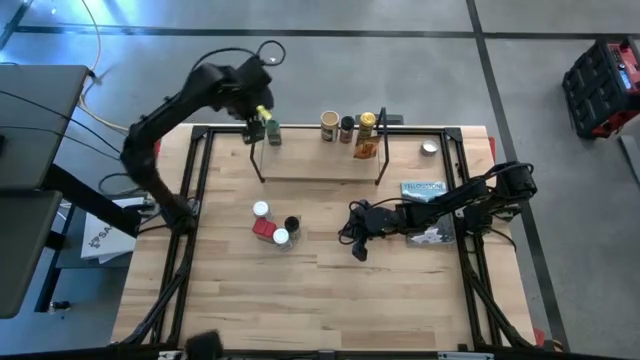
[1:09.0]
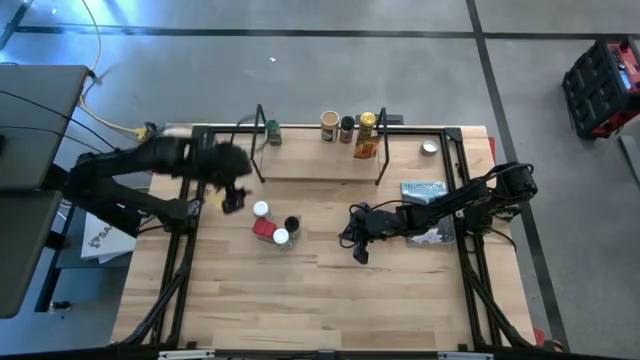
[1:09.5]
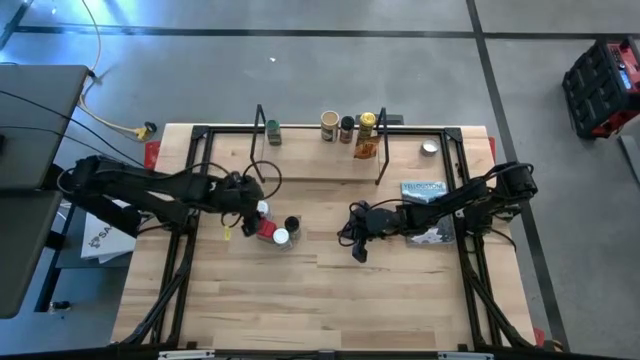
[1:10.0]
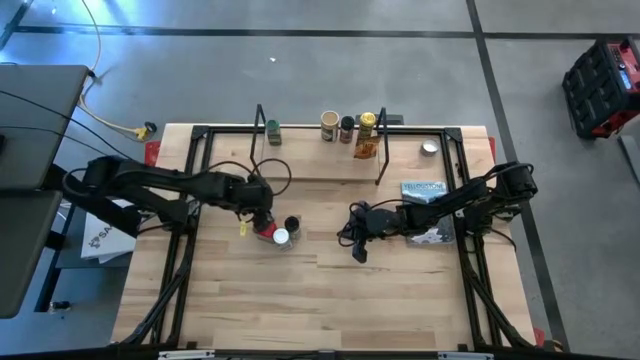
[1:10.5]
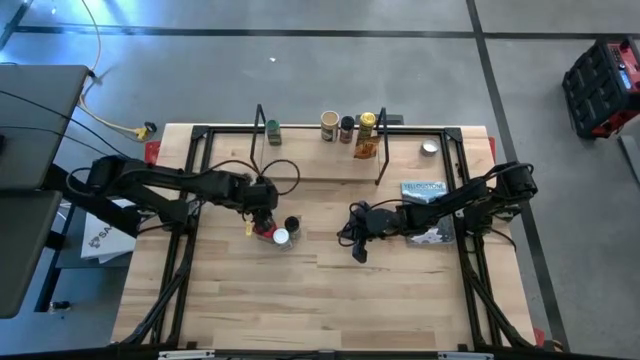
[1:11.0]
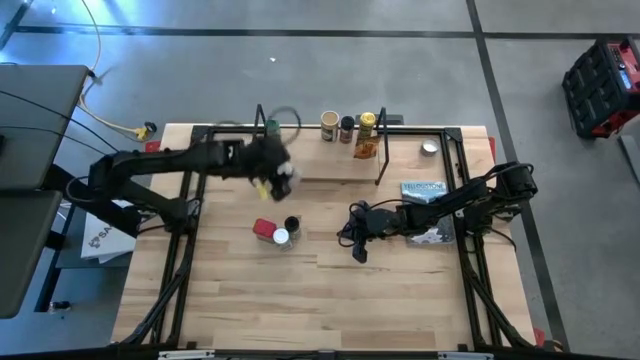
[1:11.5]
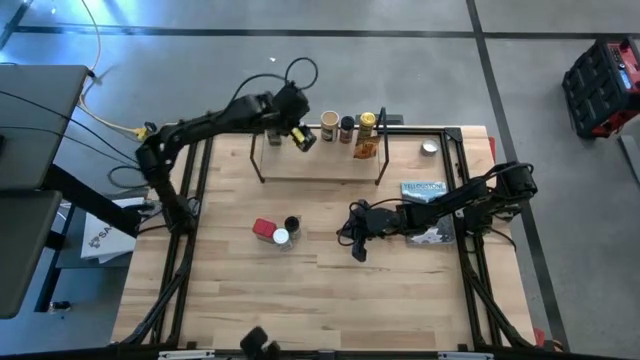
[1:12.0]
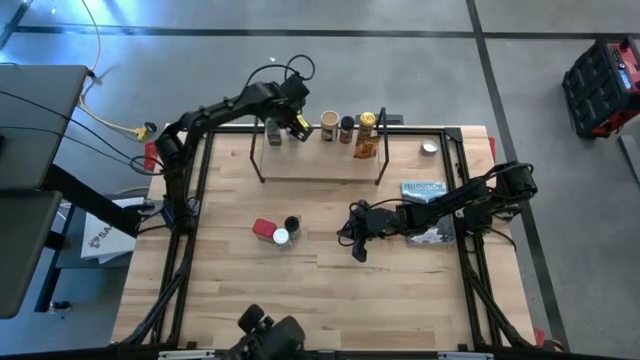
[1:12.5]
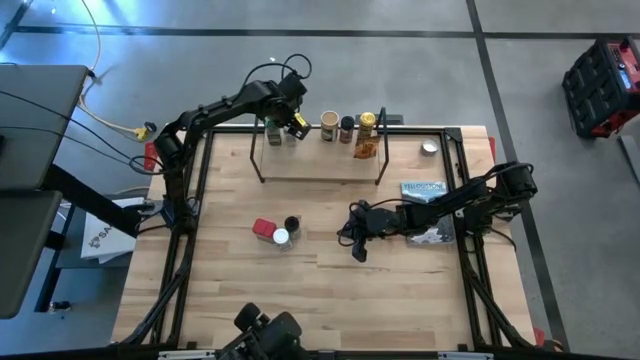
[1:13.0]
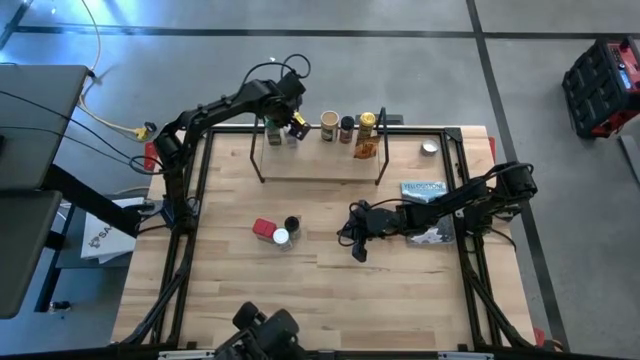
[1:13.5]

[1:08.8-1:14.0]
Task: Shelf spices
Put the top white seasoning bottle on the shelf

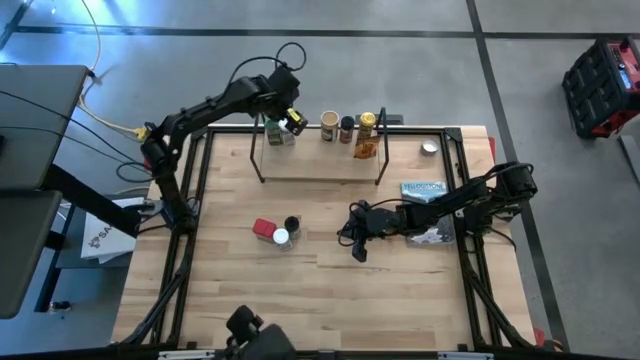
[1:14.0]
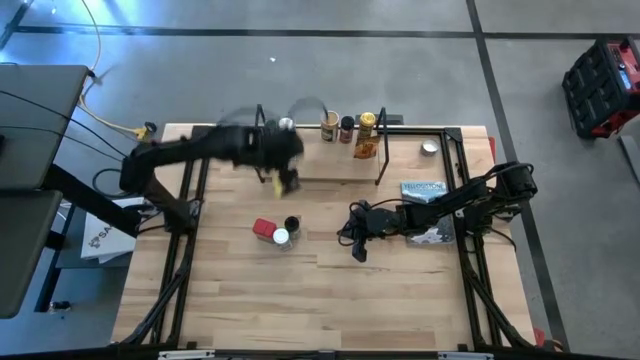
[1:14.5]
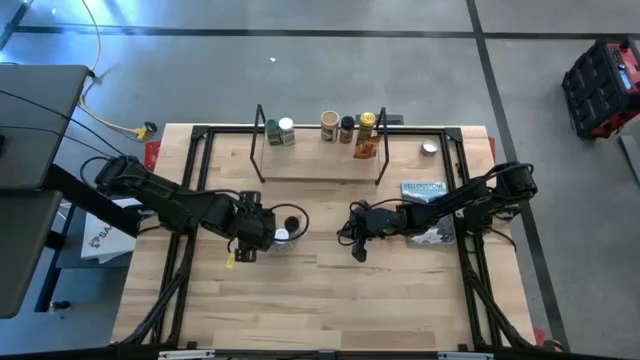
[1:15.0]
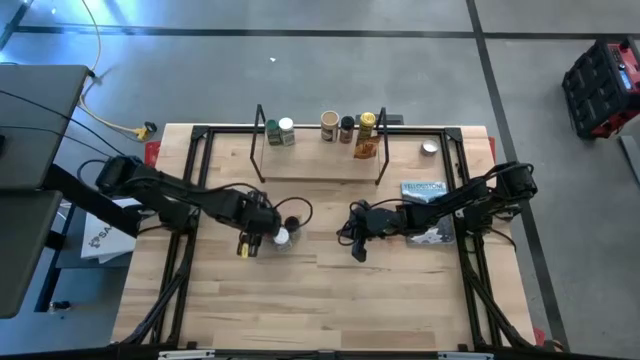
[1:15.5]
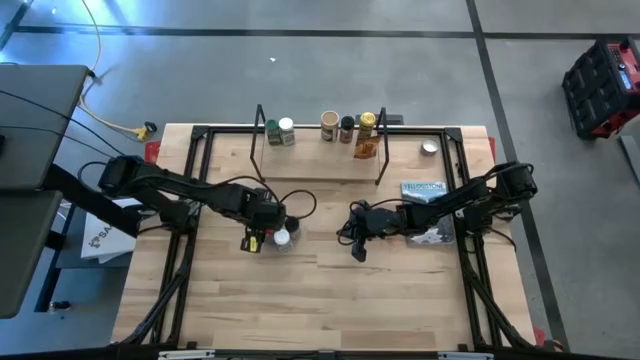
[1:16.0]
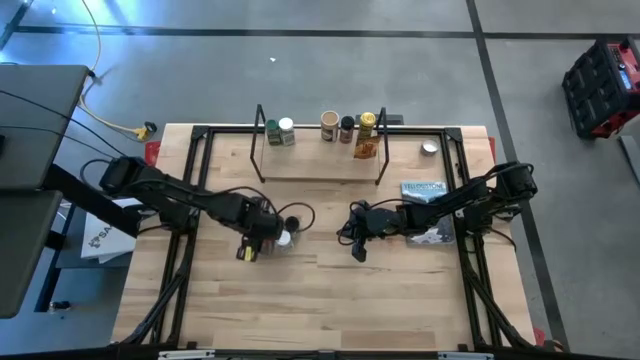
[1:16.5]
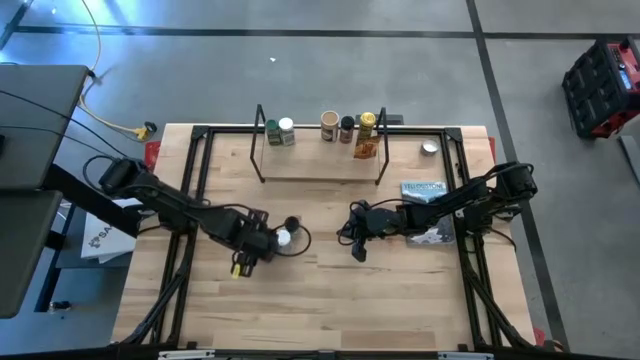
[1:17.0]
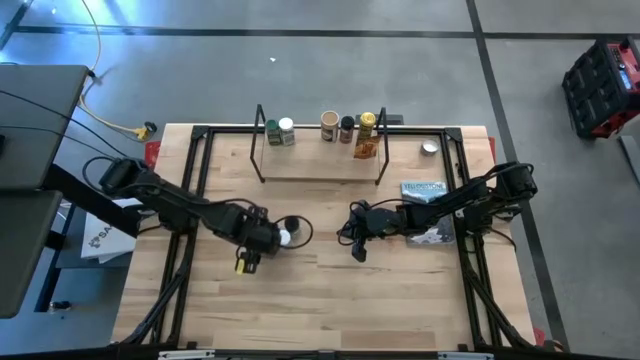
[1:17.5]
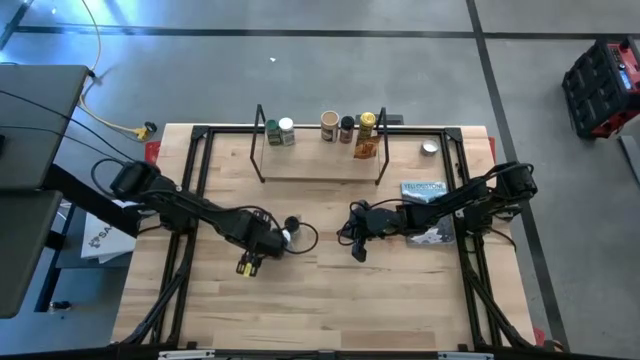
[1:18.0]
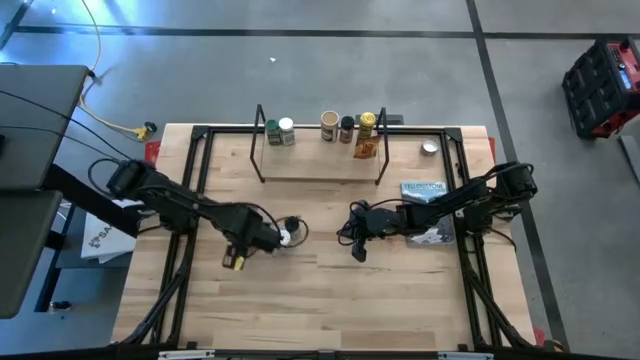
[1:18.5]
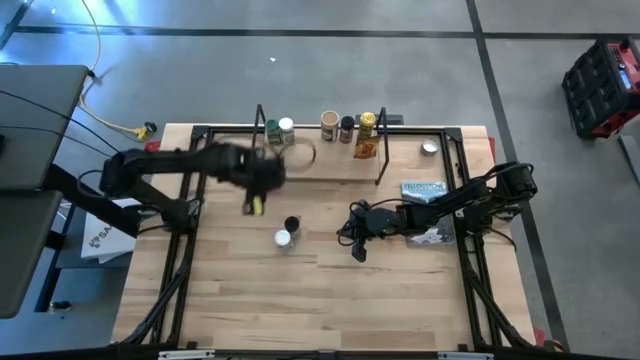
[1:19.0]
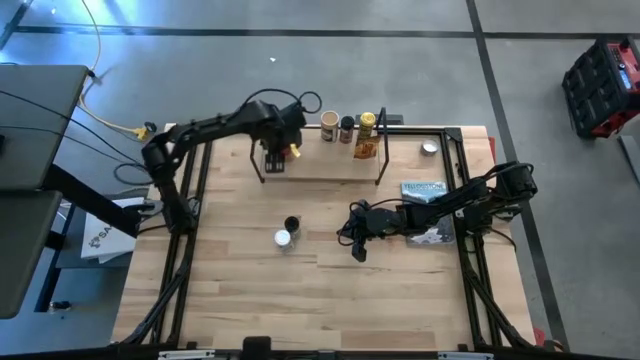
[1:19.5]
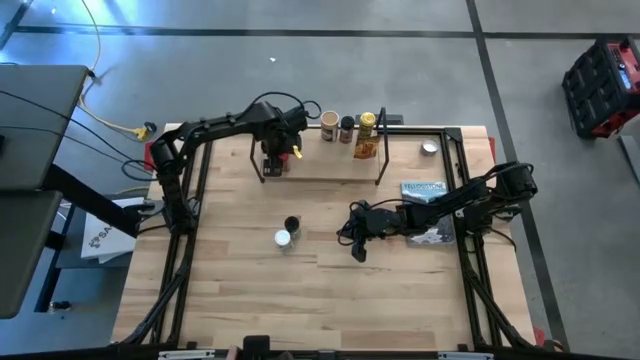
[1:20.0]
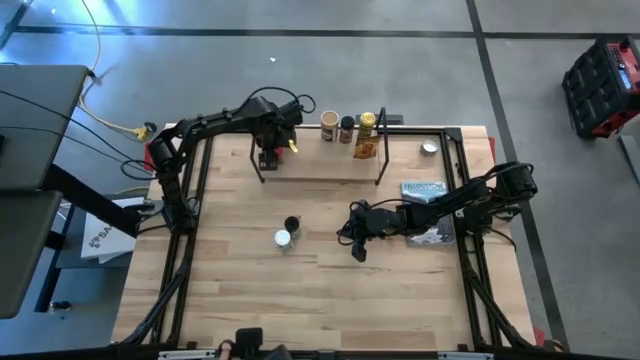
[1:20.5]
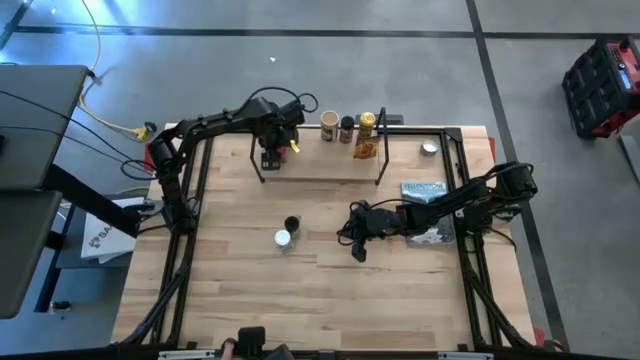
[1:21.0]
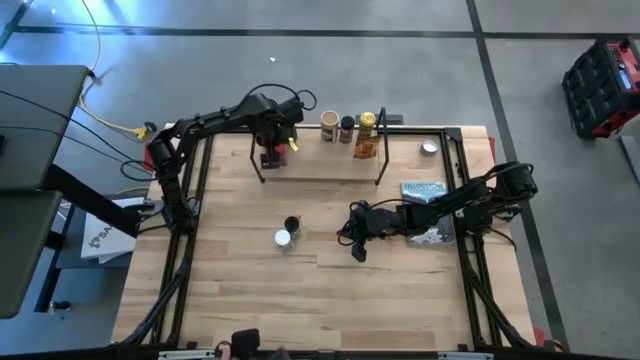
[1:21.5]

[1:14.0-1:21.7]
Put the red seasoning can on the shelf

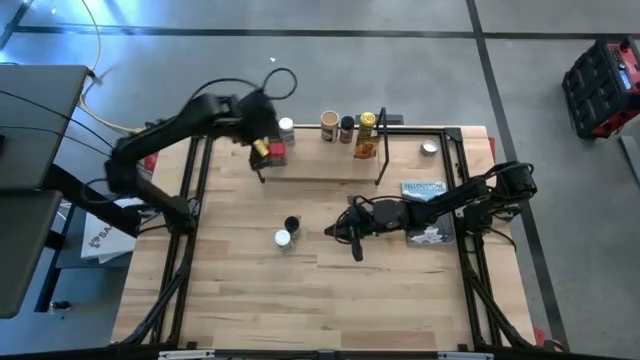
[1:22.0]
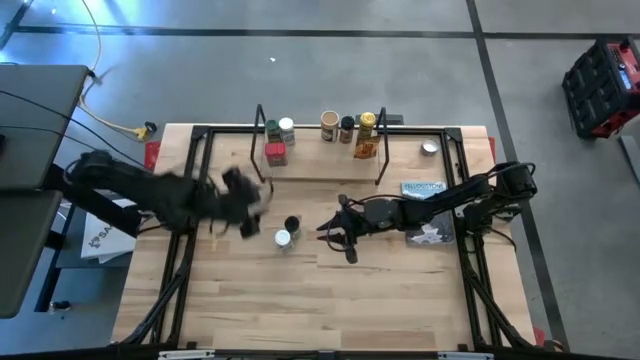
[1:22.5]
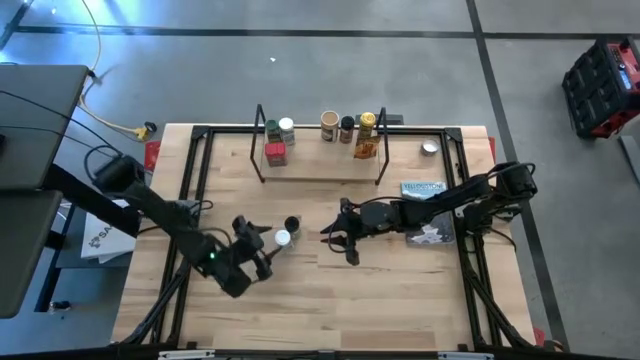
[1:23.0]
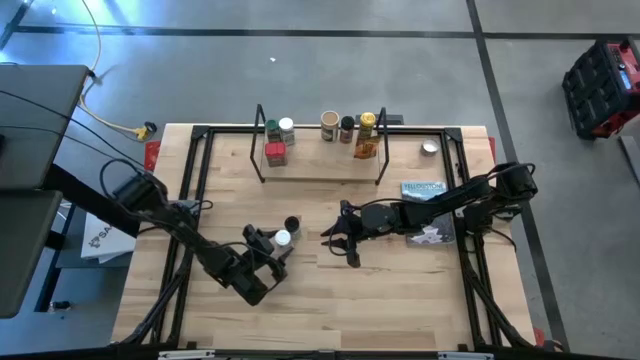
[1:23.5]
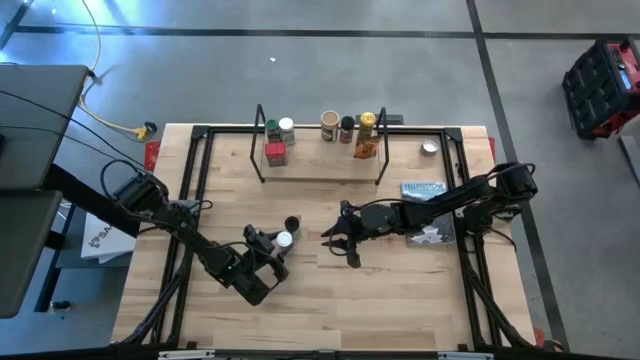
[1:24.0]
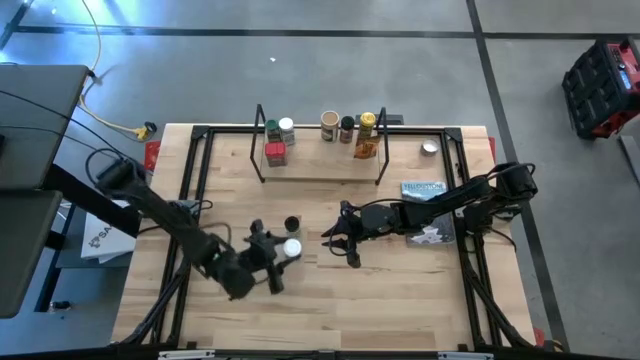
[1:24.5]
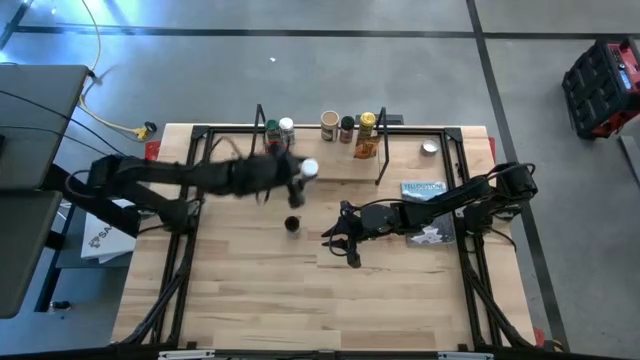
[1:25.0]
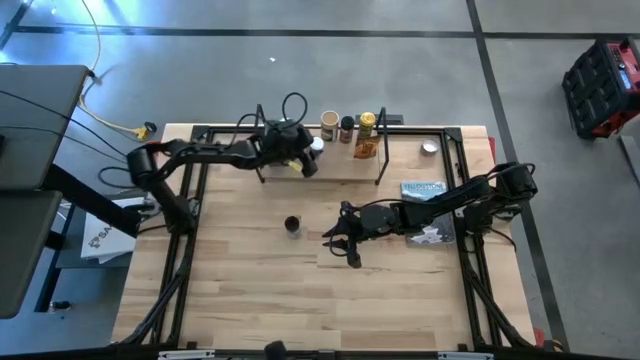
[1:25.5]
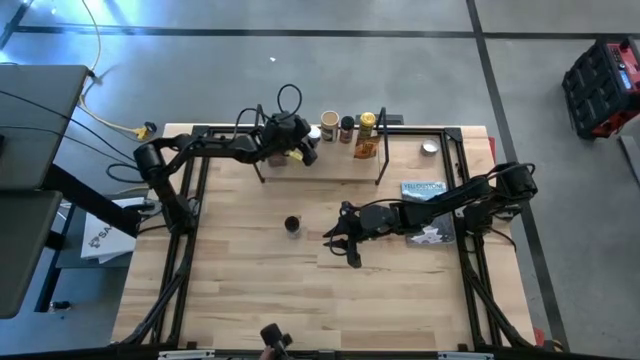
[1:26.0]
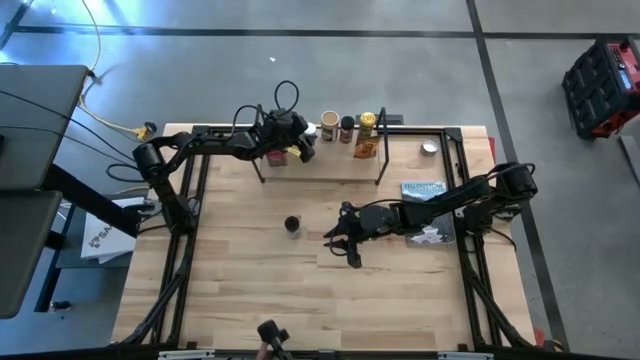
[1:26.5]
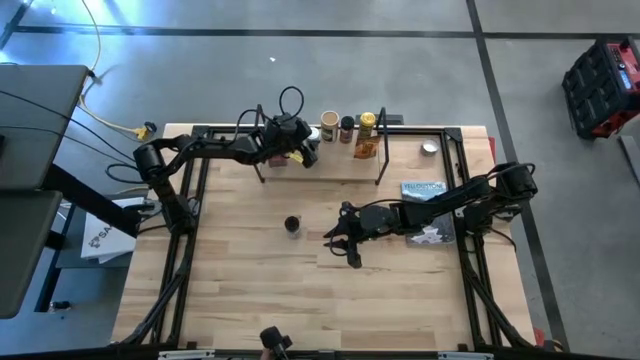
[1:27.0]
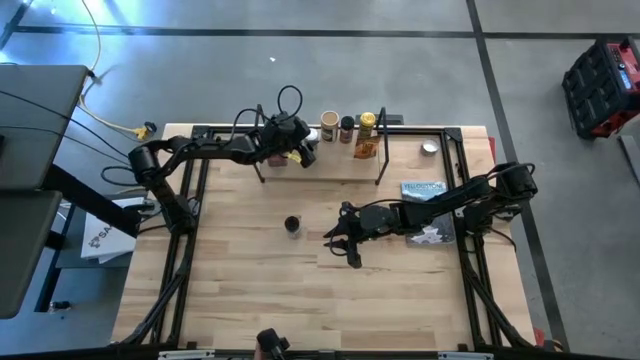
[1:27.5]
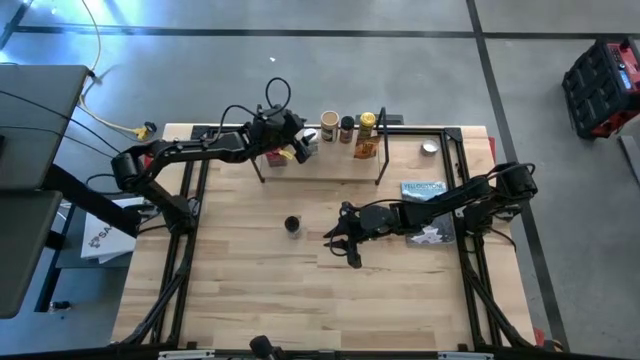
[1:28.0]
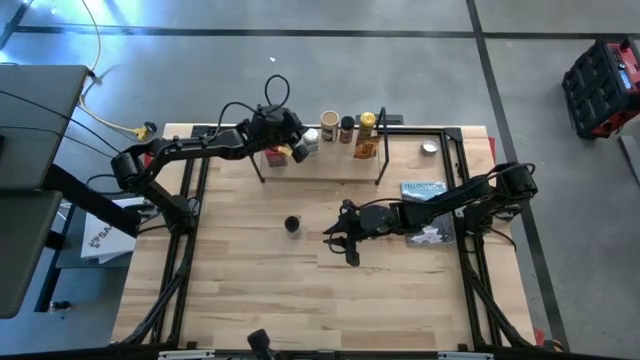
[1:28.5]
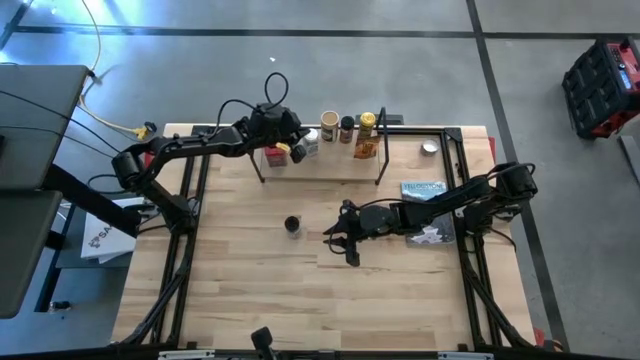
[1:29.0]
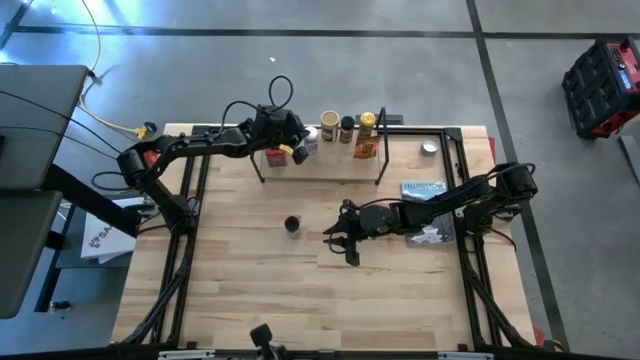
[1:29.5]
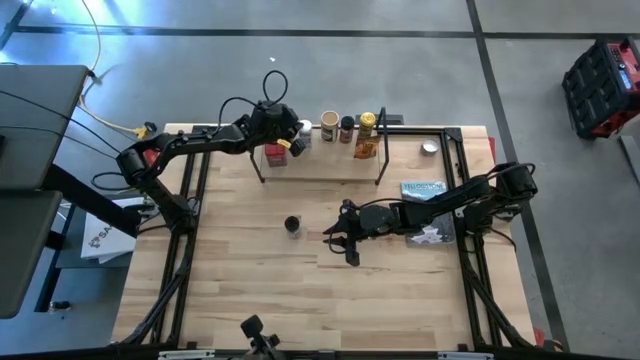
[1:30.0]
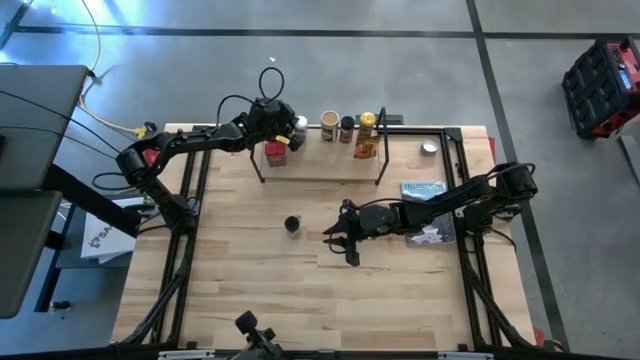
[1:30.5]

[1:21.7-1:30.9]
Put the white seasoning bottle on the shelf
